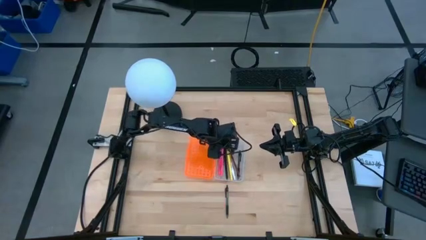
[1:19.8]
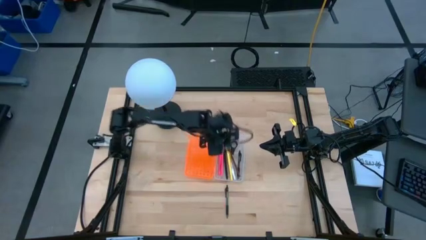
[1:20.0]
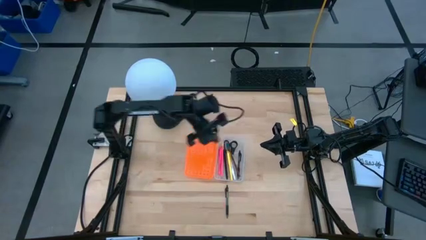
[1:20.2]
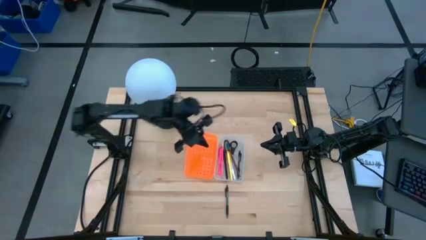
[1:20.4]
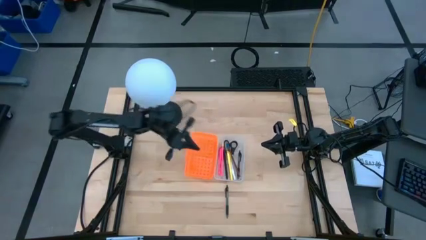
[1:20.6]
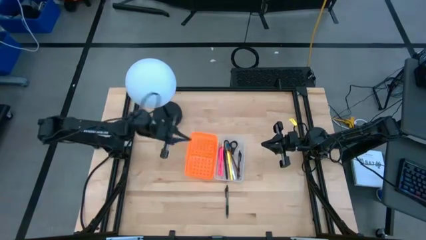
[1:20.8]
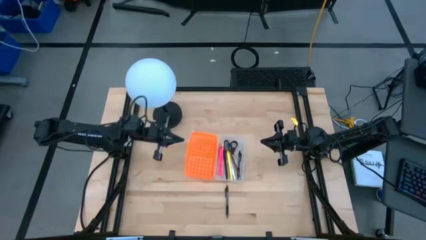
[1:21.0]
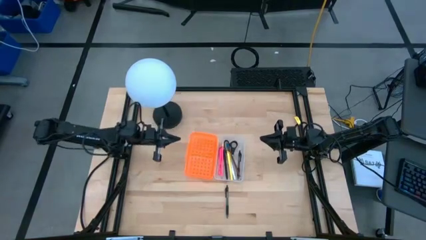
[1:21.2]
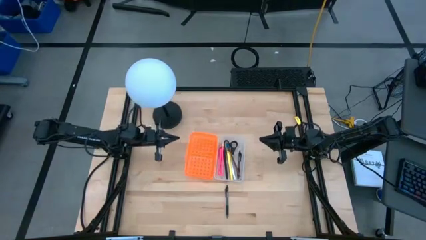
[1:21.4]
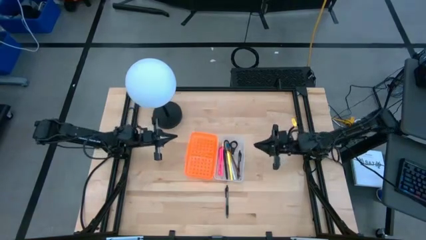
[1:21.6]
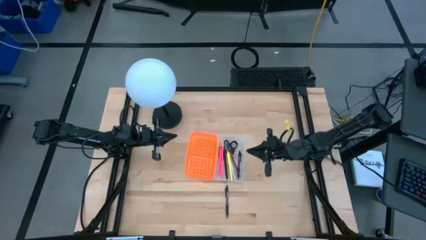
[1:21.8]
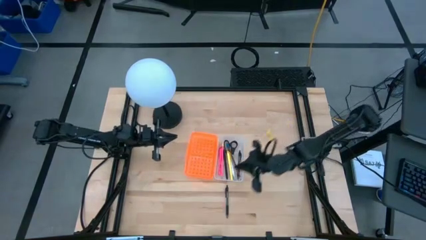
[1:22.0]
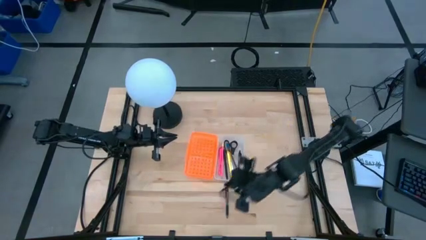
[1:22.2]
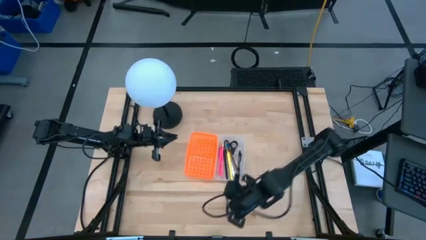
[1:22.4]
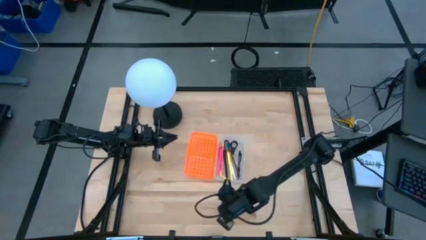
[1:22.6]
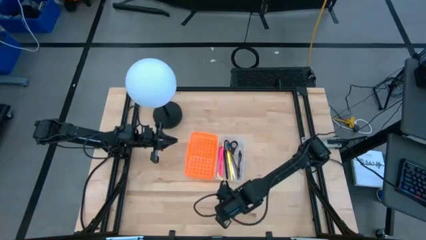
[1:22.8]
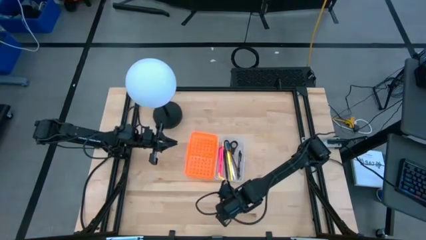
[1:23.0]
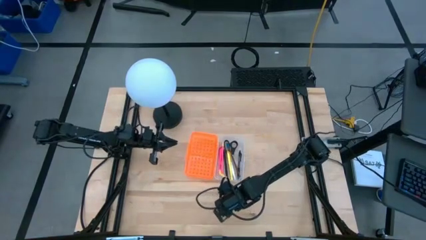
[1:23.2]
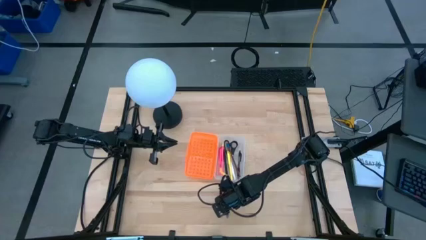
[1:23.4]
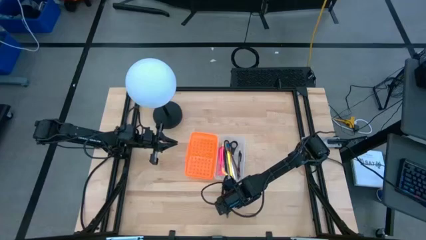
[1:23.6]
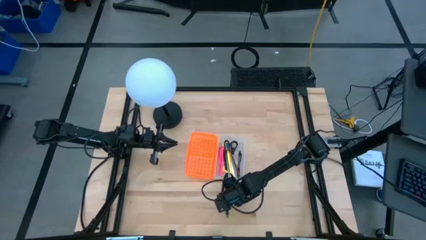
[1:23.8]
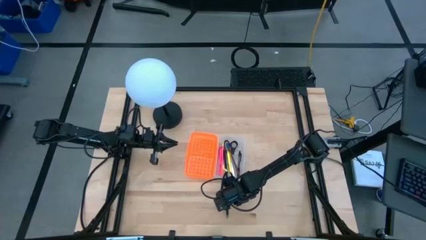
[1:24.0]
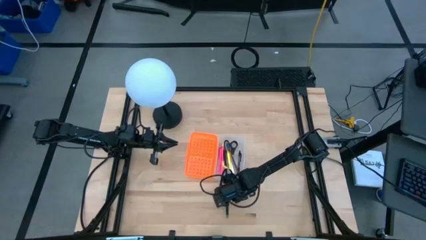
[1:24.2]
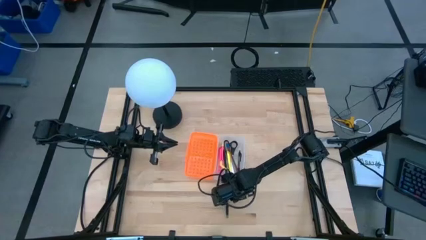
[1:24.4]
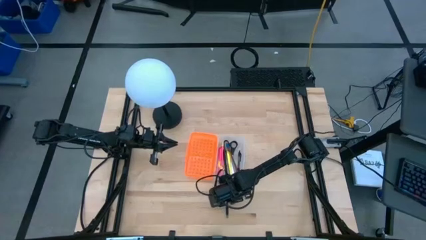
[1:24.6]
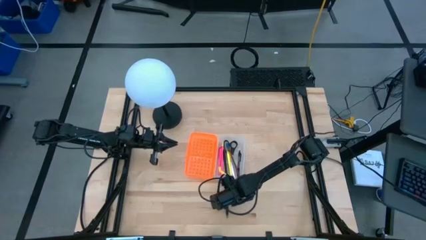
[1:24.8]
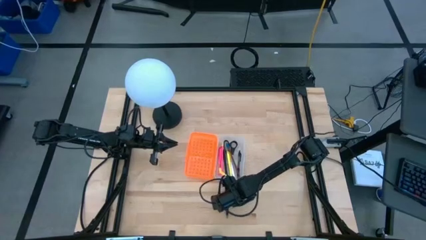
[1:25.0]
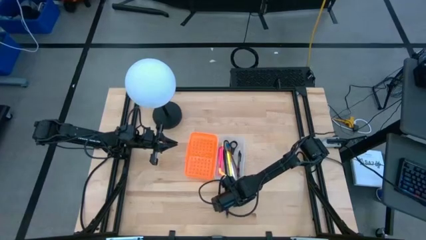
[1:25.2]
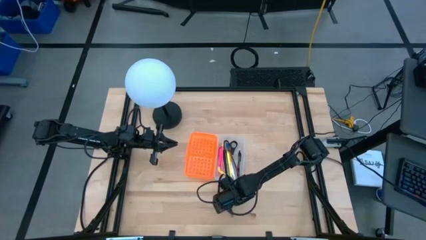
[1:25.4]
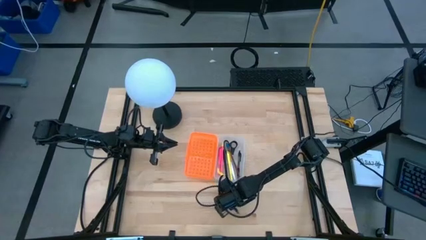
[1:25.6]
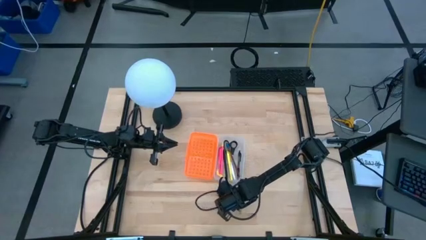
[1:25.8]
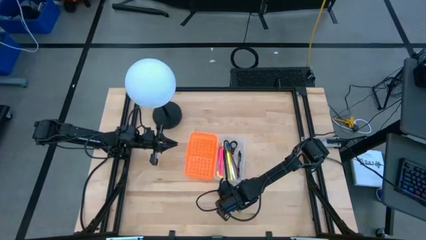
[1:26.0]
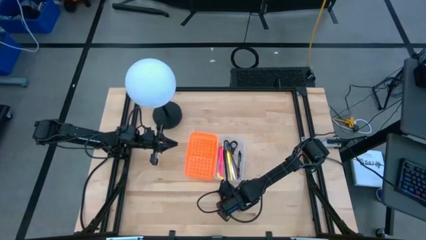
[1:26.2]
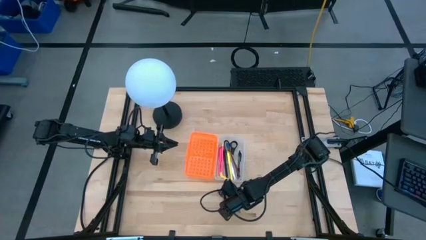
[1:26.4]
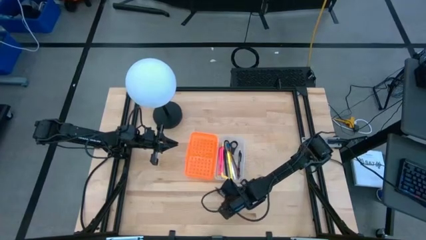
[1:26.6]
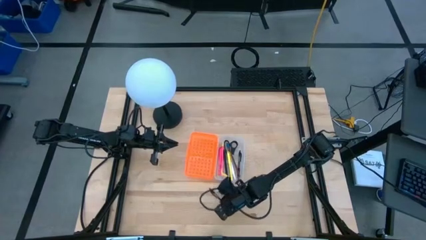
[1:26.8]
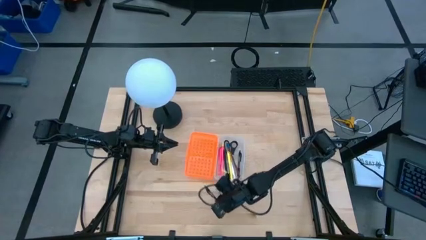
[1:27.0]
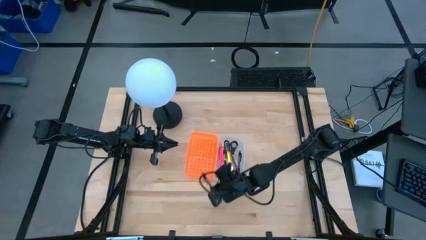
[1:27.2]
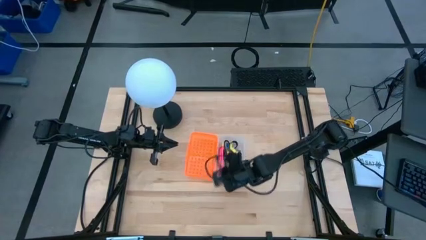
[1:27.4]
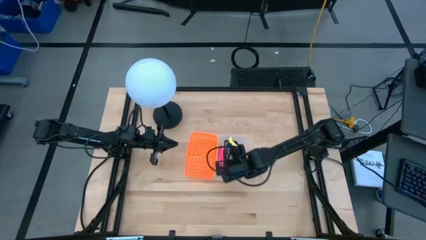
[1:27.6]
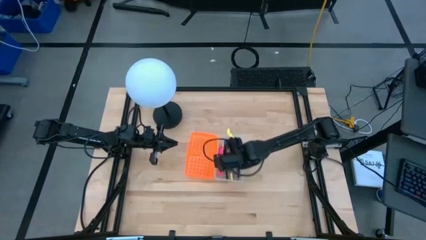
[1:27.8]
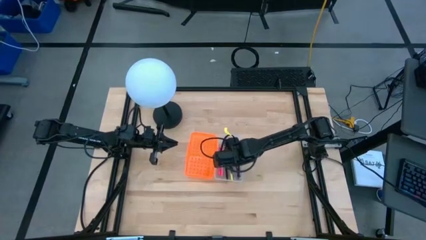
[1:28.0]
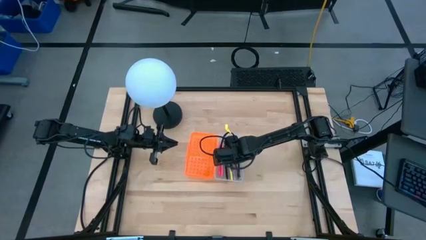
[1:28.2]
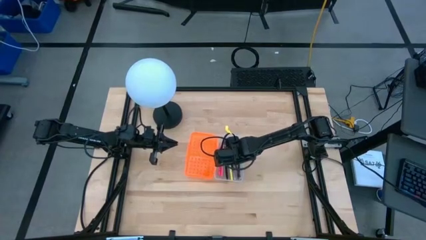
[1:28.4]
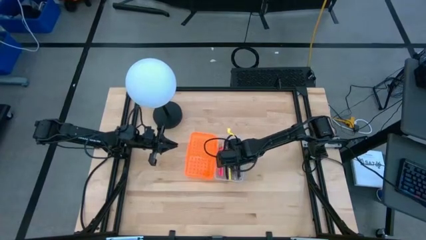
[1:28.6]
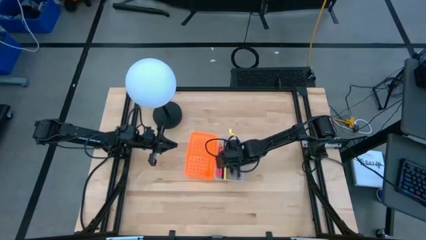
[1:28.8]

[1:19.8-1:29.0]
Task: Pick & place school supplies into a supply box
Put the transparent pen into the orange supply box

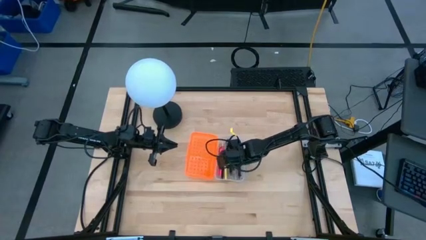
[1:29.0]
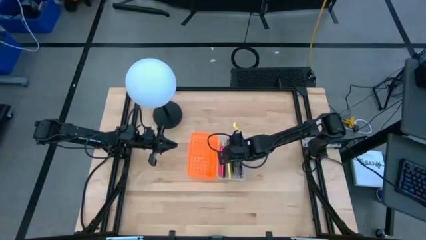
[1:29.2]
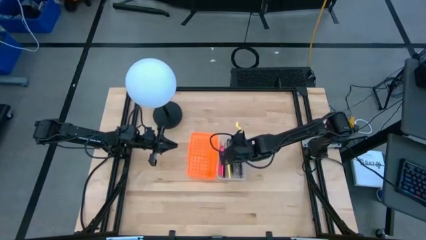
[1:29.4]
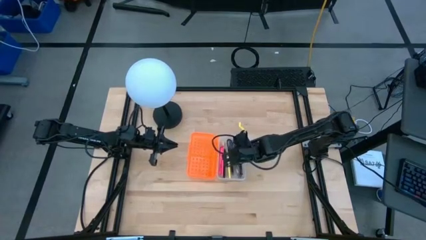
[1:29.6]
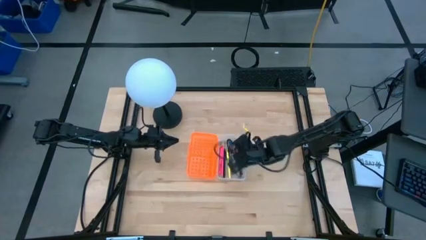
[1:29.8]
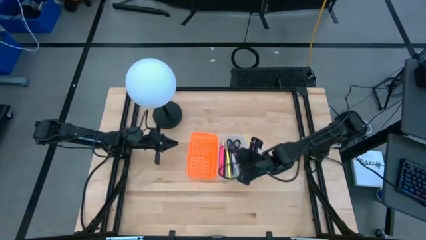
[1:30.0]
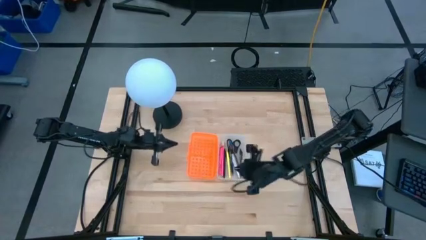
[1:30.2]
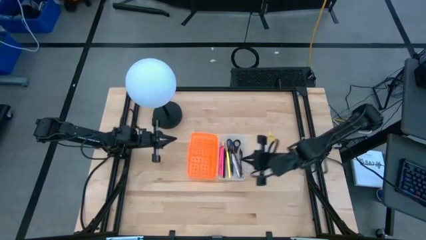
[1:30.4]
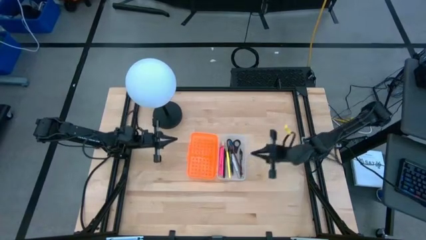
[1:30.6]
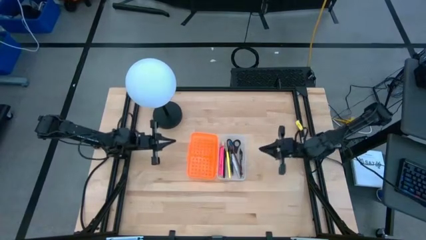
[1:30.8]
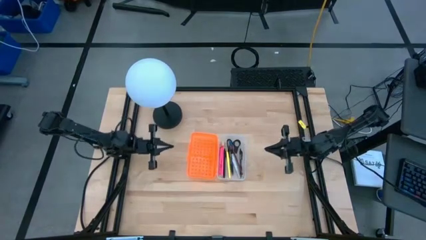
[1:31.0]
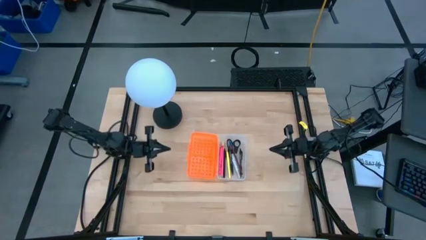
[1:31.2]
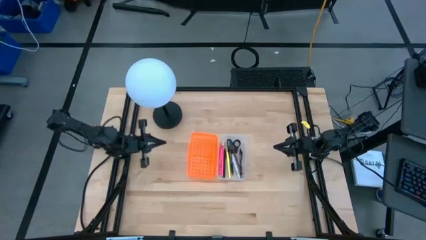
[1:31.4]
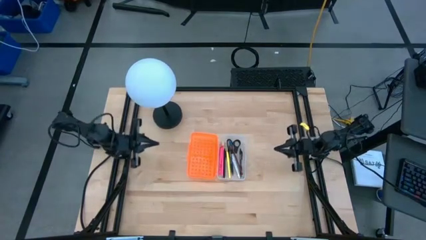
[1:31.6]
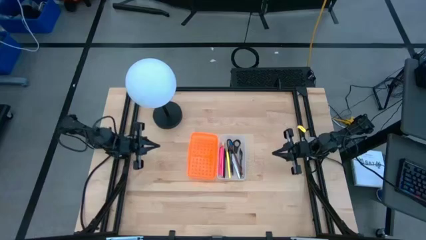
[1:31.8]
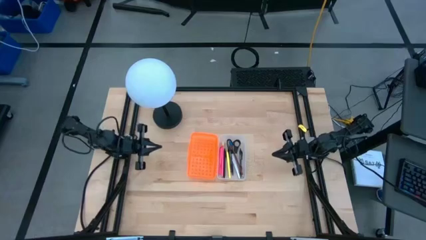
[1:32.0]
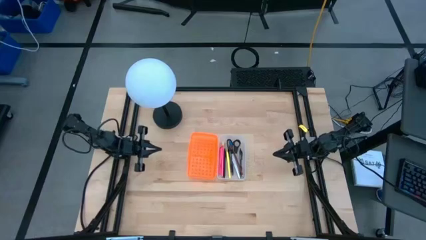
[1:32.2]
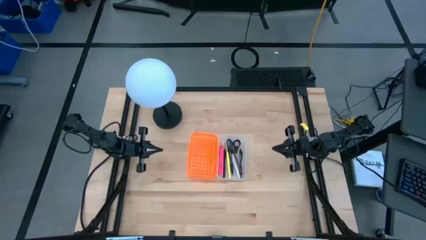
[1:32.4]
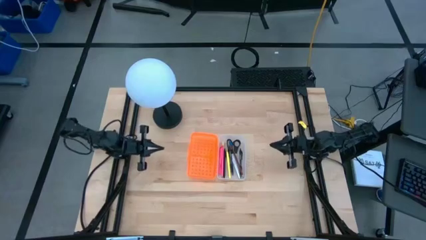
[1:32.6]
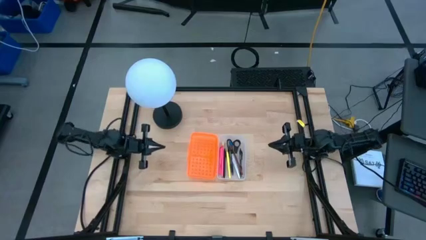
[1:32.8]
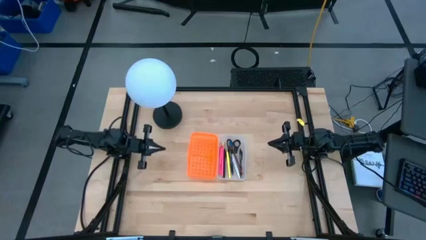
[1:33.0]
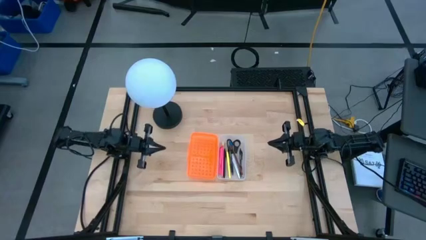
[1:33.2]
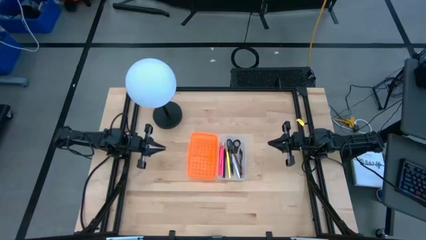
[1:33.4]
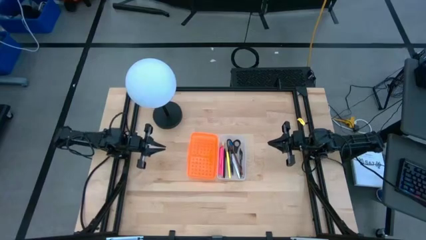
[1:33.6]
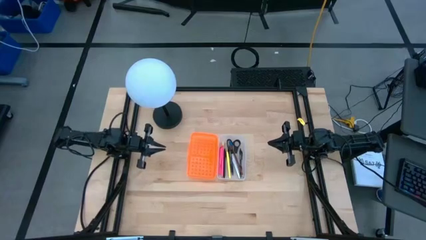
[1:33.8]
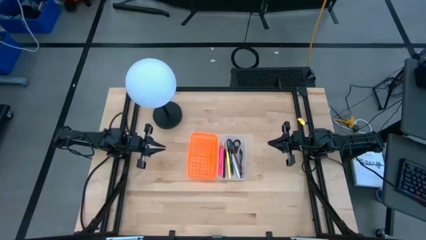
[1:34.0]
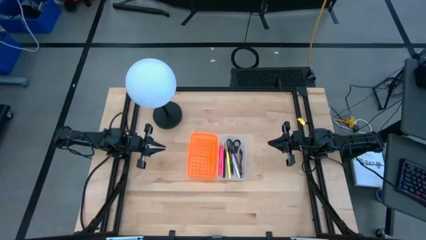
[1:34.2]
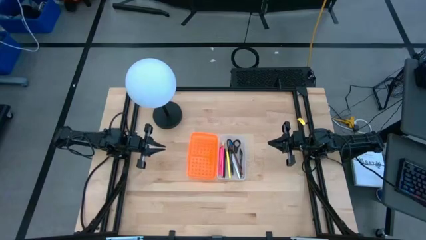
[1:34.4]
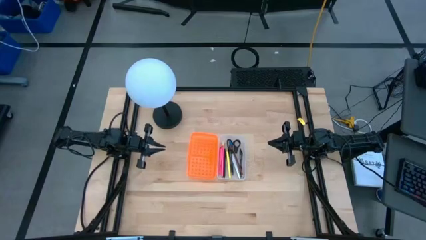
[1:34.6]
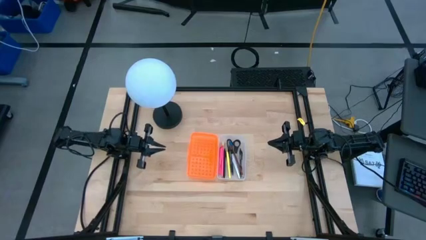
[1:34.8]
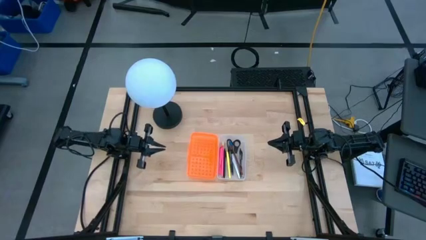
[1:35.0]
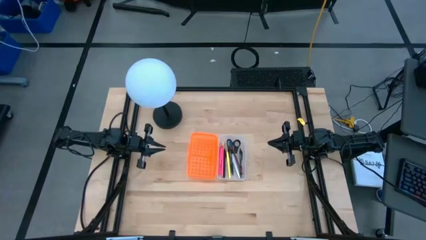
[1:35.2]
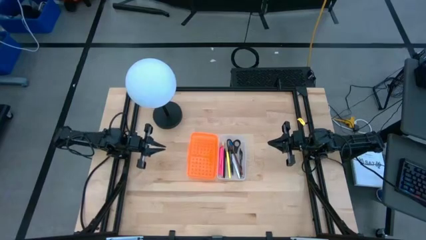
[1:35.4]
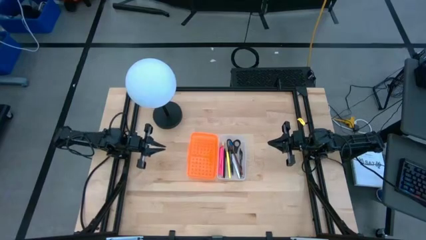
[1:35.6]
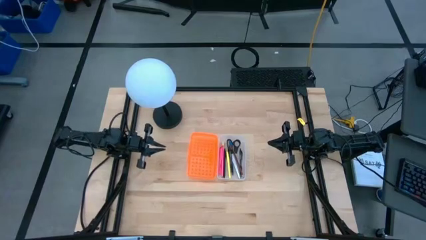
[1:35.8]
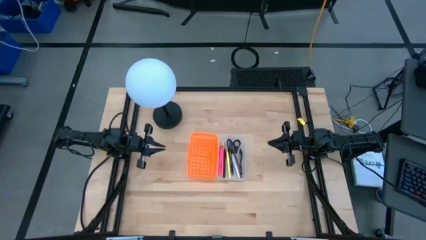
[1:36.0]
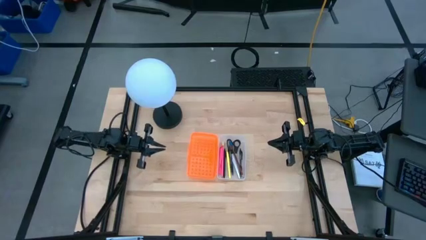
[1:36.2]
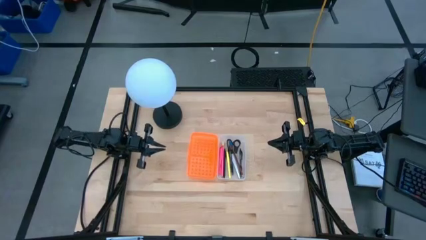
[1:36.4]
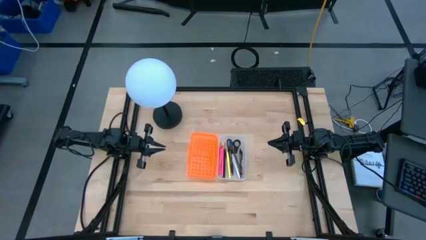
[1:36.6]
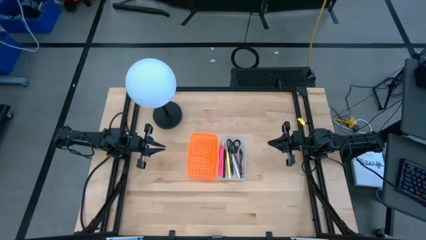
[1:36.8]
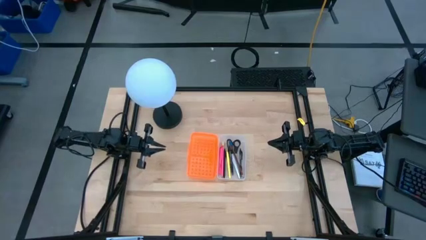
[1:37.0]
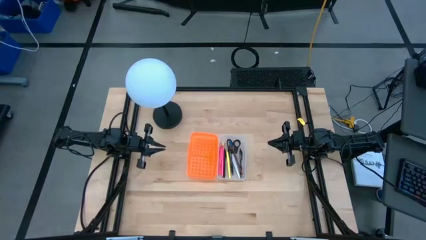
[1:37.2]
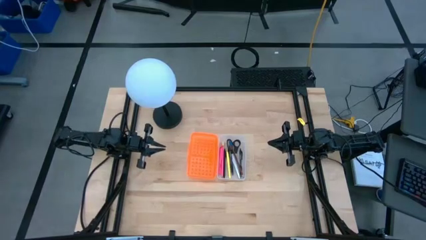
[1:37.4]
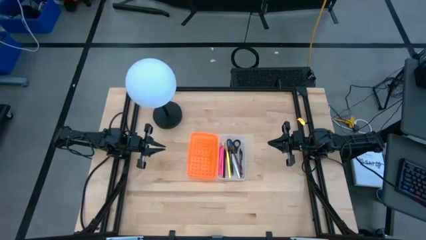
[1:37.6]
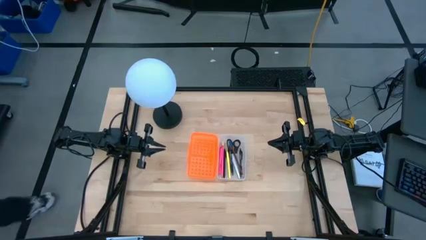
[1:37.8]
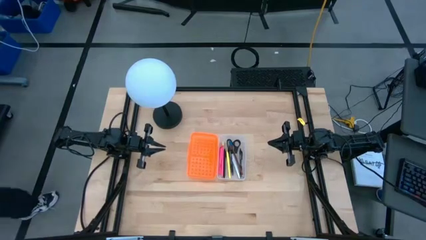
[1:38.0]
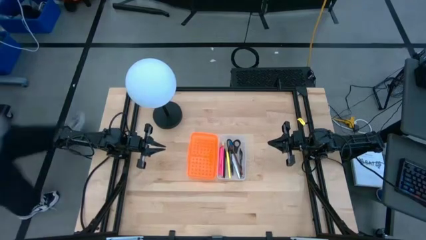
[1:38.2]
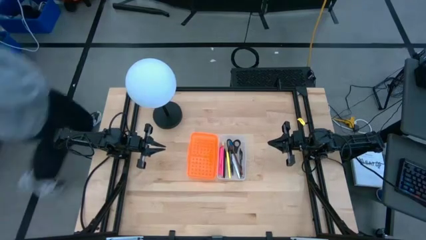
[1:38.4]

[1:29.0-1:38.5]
Return to Home Position
